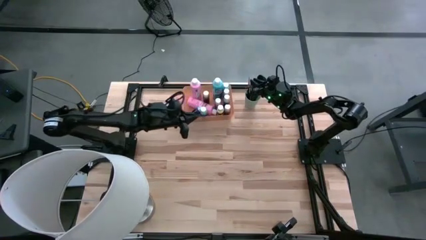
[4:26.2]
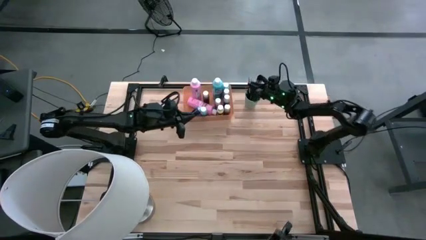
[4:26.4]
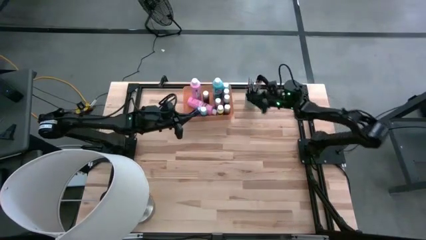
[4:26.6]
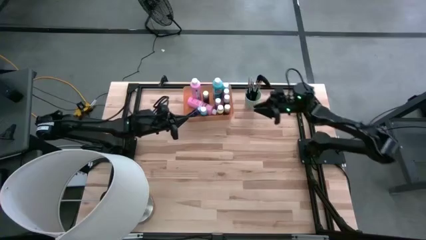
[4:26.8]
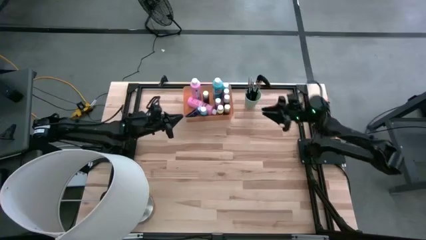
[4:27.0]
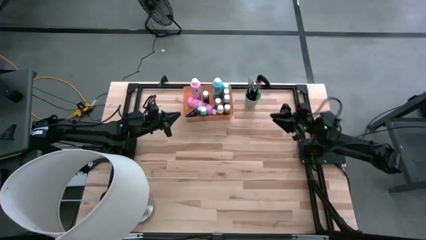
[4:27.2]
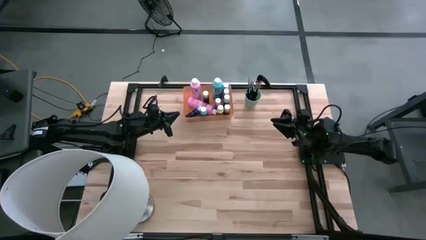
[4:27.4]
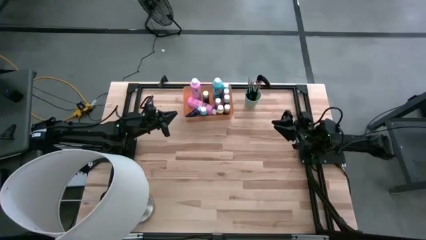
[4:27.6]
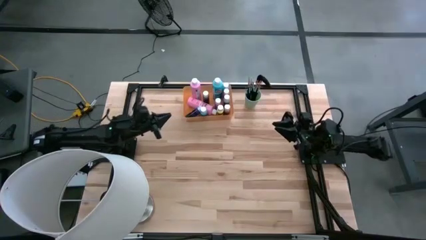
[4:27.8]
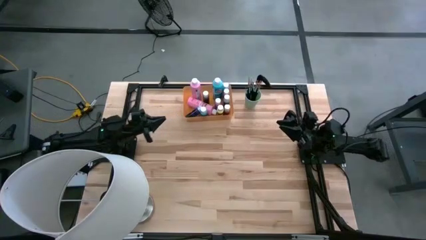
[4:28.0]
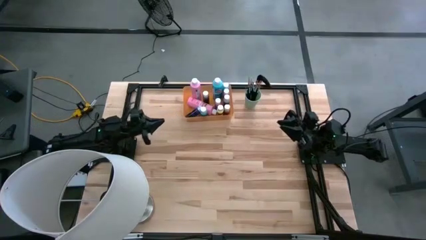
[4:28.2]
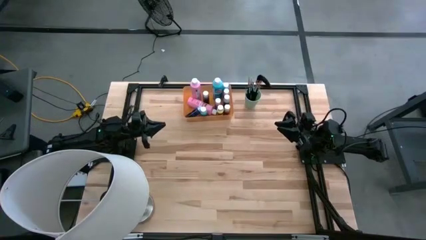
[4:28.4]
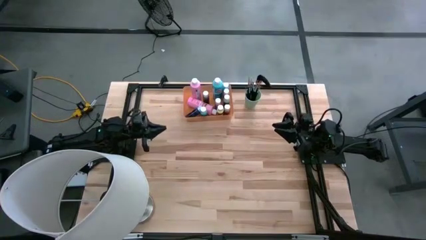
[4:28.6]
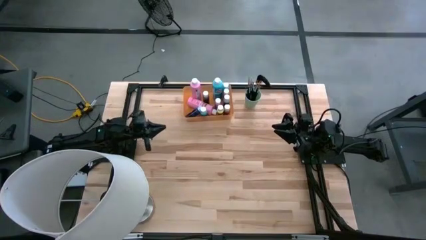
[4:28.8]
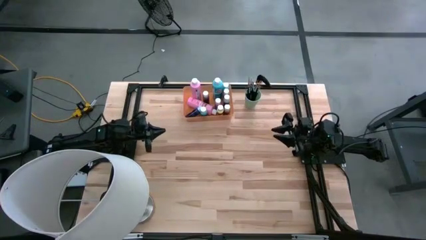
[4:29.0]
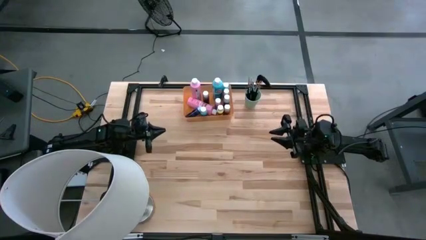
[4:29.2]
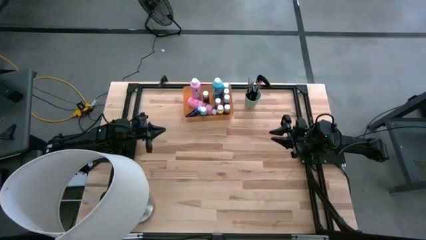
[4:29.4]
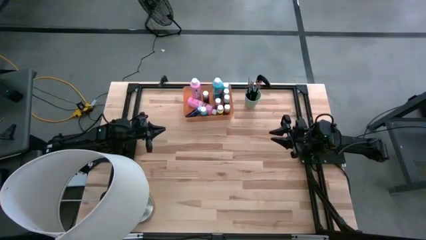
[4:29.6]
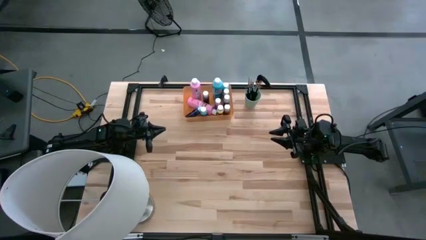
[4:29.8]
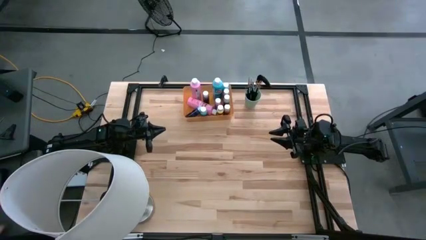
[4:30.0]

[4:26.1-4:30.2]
Task: Pick & Place Paint Supplies
Return to Home Position

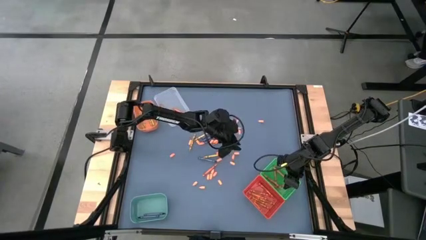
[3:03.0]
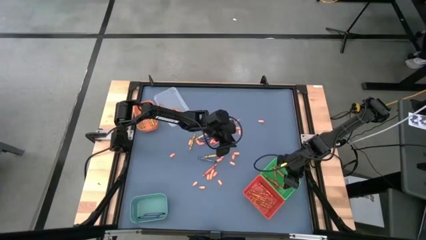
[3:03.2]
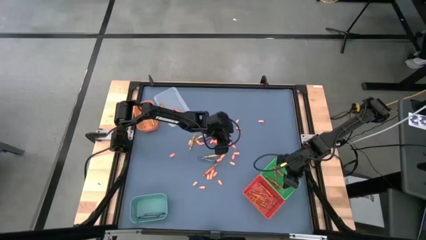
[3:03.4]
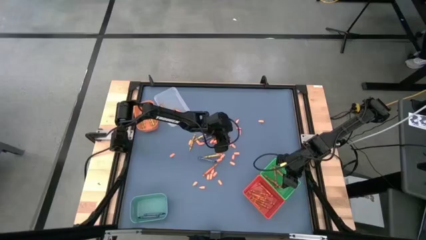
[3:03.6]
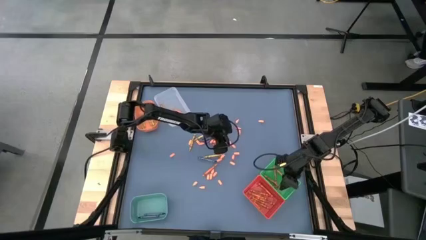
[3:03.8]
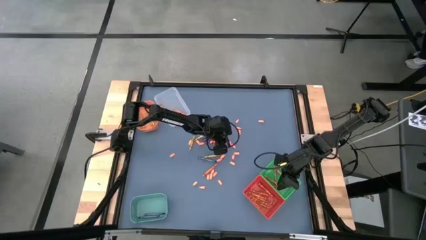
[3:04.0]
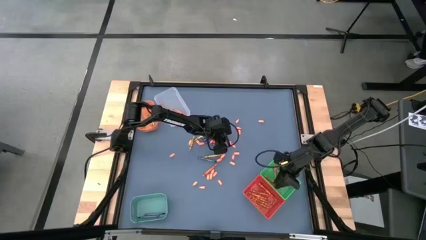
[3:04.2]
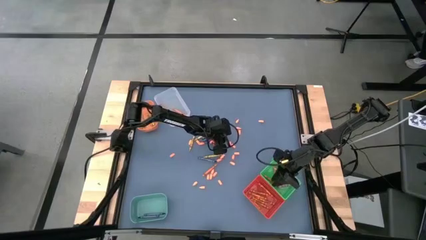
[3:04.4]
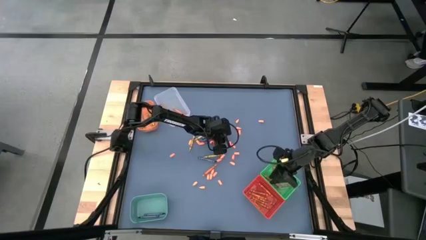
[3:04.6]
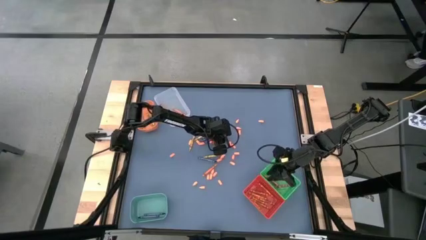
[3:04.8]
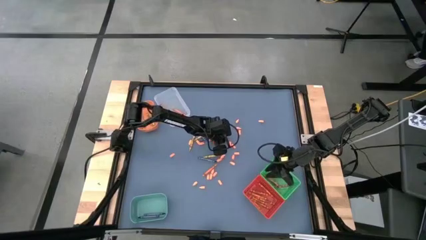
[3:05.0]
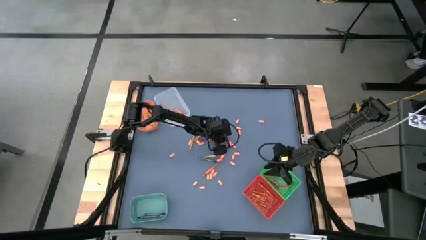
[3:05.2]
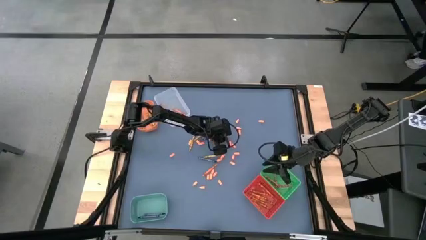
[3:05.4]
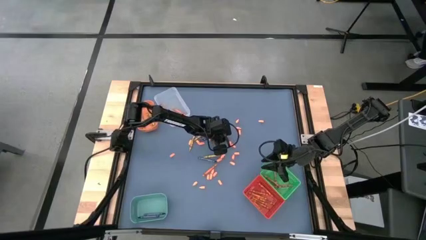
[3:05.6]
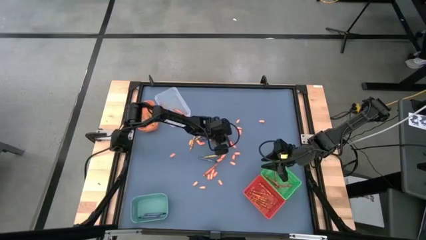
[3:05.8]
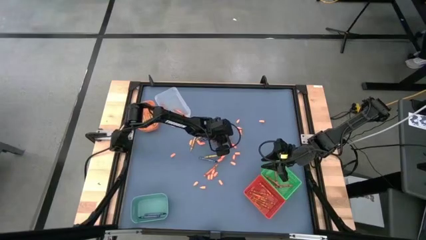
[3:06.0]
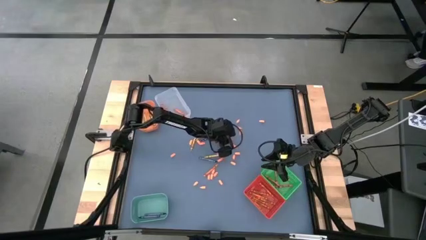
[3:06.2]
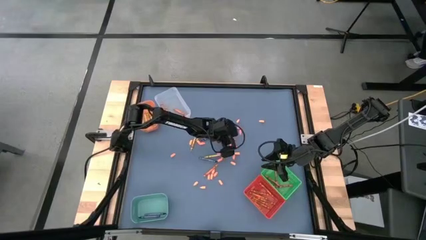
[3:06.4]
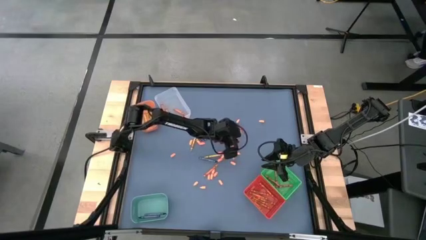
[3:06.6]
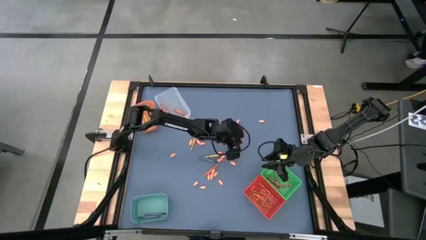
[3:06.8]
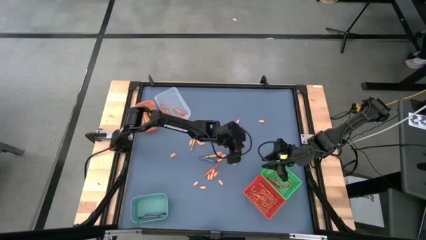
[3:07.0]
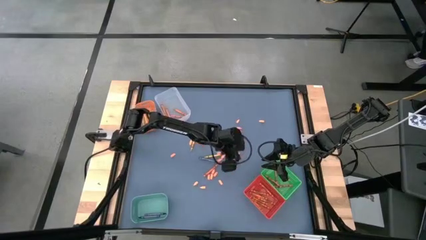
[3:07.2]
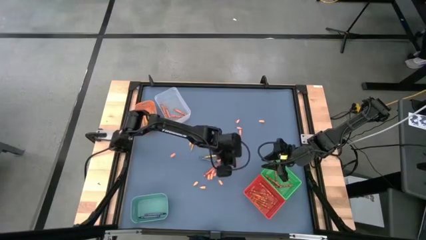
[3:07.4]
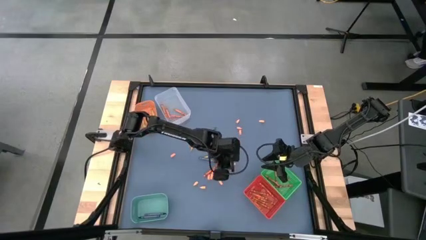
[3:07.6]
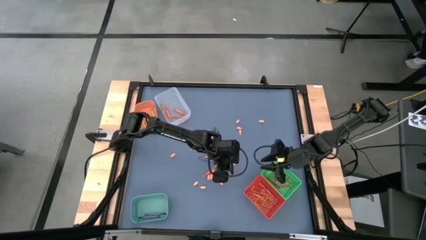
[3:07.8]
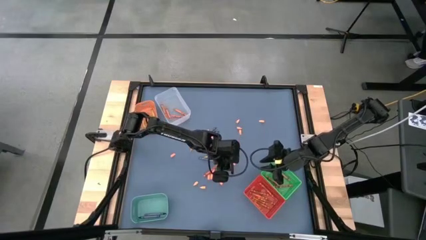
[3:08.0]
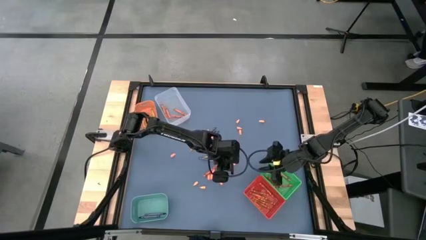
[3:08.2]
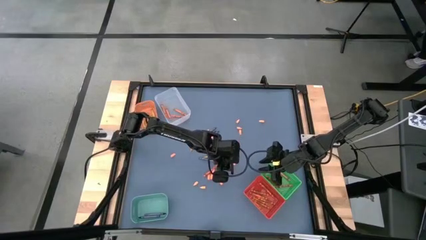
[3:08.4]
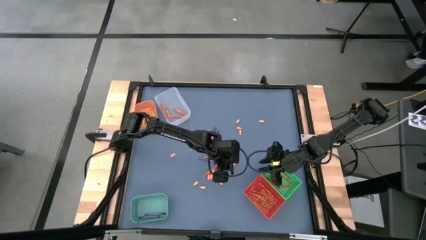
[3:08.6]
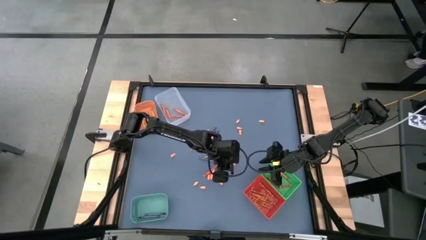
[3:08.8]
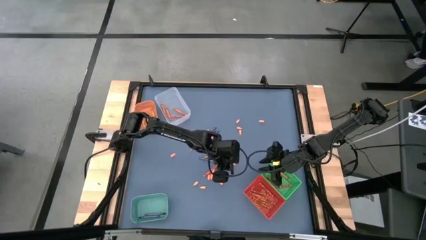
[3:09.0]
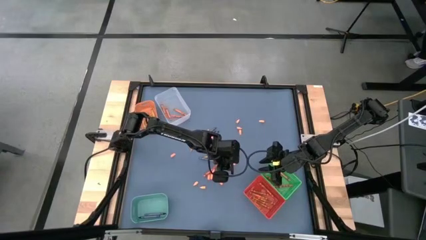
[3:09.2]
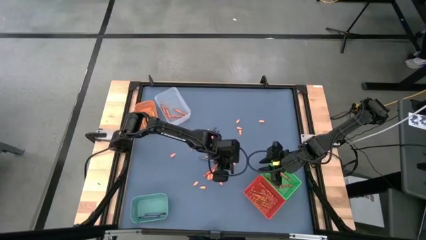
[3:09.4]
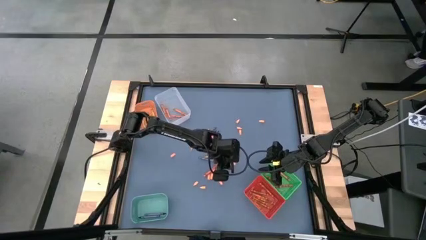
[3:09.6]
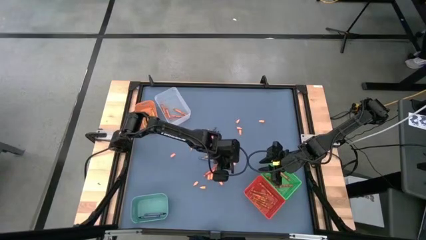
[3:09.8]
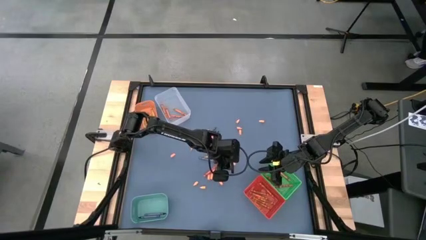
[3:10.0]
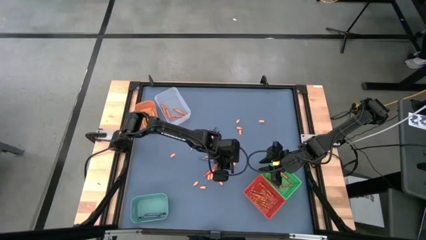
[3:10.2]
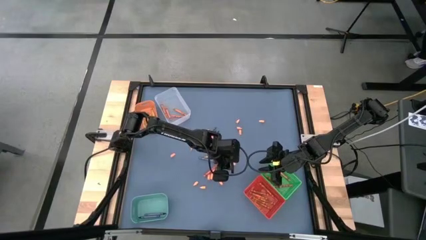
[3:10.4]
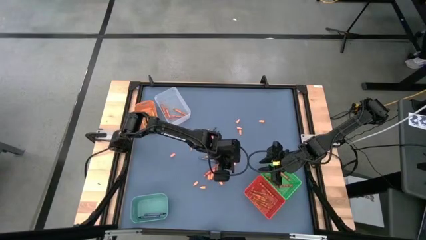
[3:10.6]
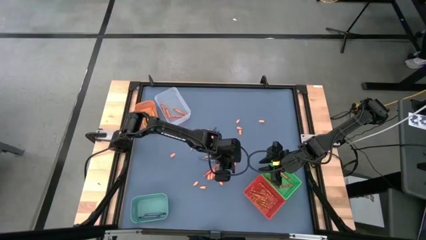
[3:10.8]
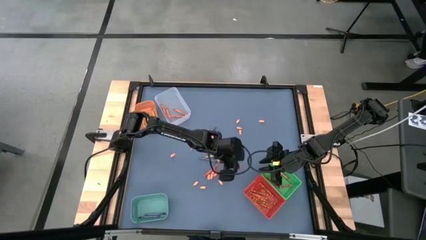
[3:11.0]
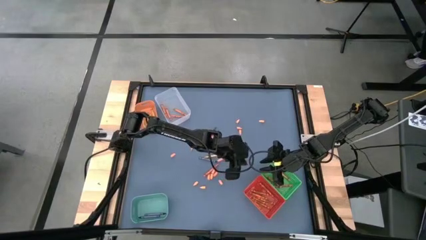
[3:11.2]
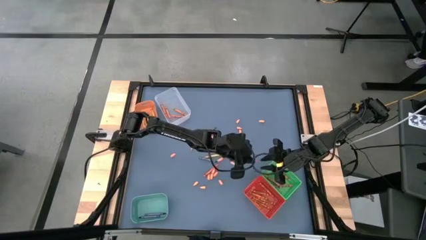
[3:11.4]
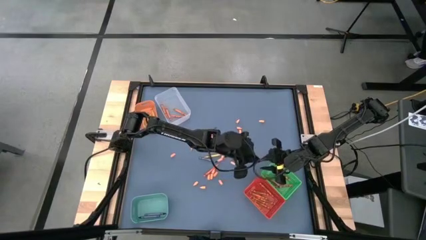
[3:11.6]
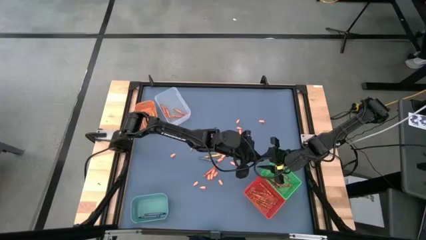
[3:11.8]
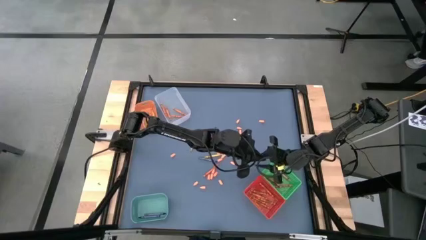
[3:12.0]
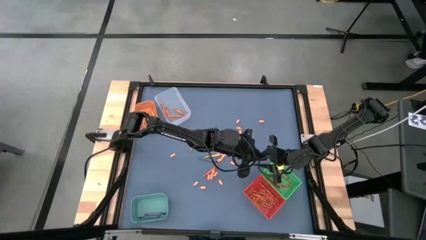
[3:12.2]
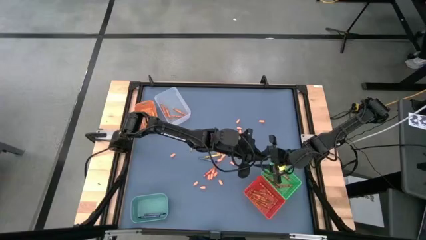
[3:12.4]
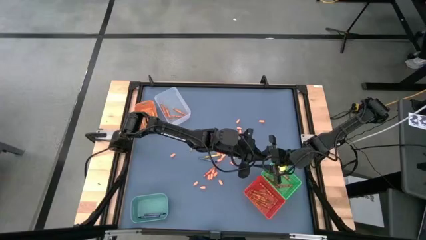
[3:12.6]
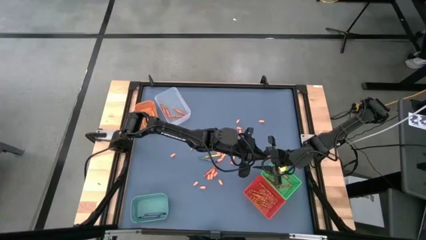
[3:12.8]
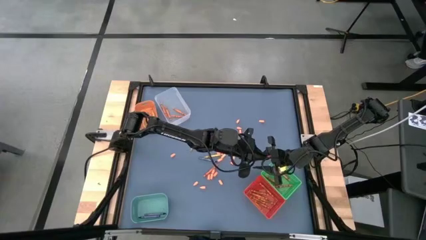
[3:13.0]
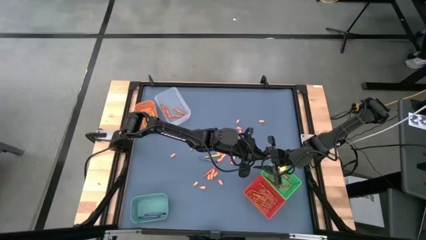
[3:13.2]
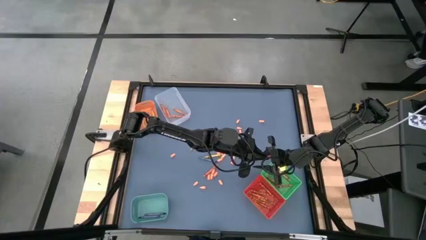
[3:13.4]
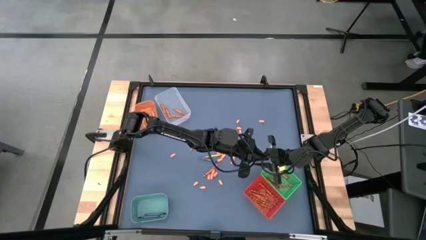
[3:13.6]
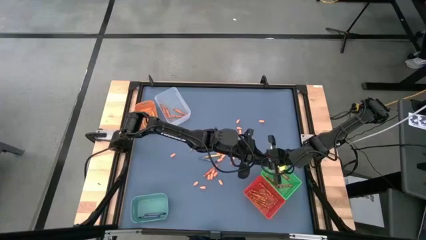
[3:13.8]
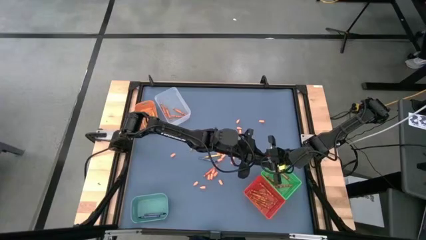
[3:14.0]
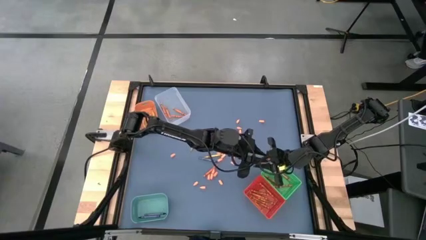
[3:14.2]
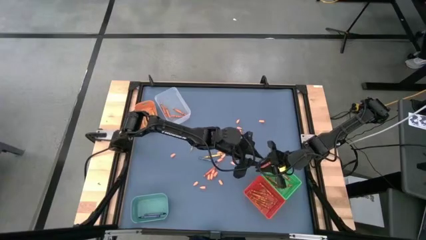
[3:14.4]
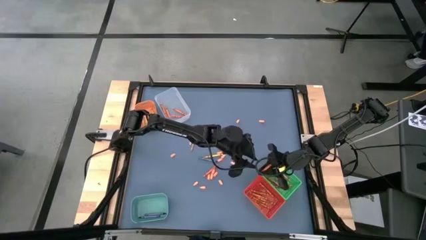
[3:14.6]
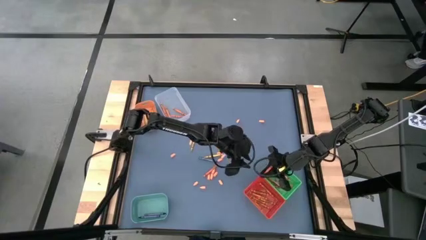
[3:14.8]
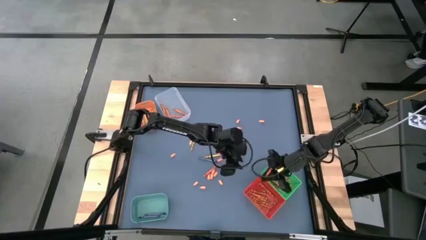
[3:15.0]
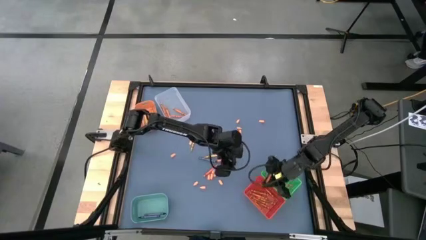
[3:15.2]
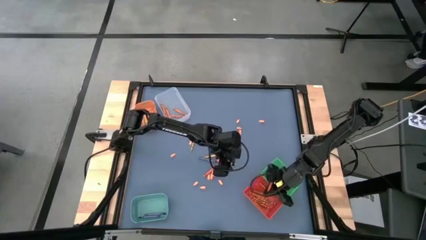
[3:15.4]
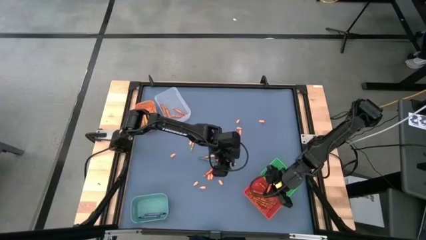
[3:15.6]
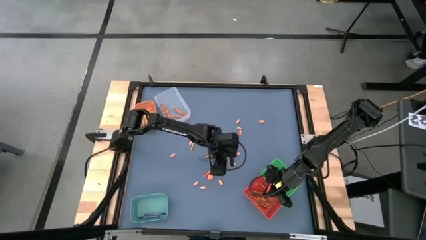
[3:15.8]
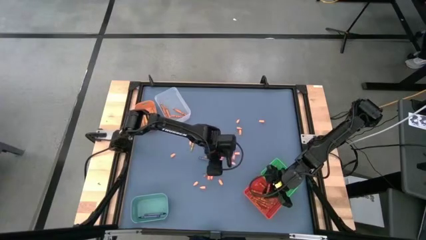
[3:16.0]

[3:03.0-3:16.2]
Task: Sort crayons
Put the red crayon into the red bin
